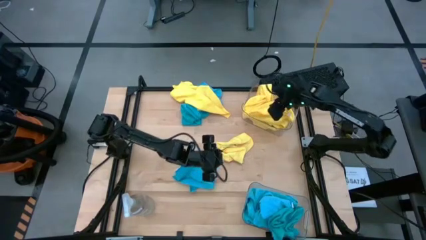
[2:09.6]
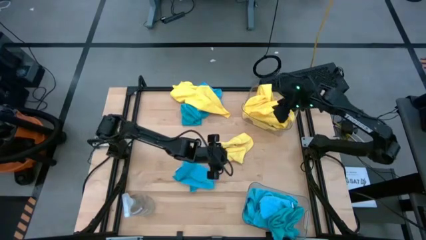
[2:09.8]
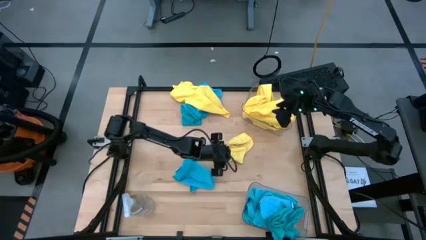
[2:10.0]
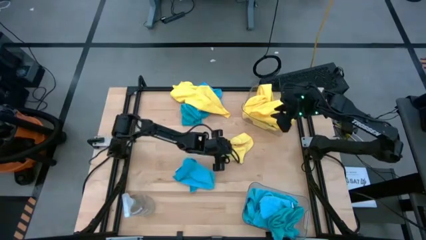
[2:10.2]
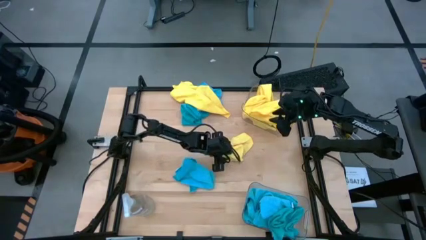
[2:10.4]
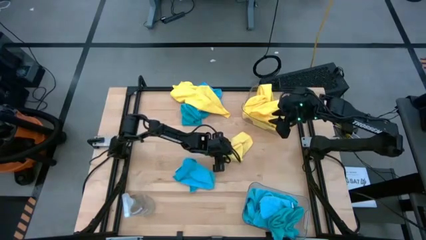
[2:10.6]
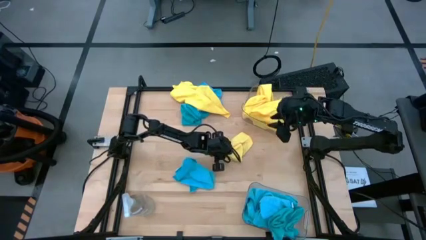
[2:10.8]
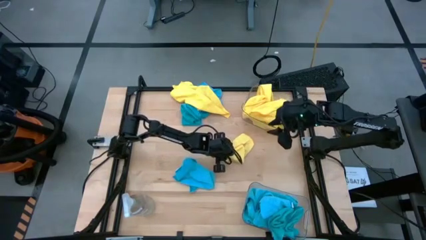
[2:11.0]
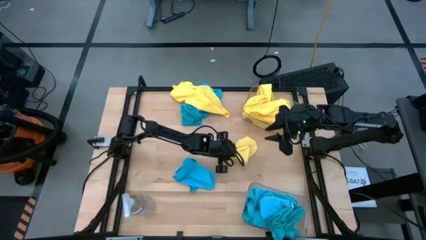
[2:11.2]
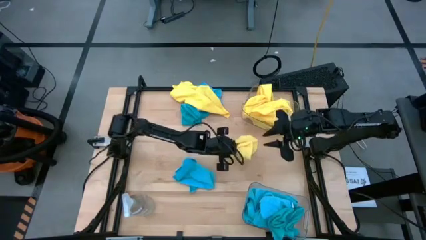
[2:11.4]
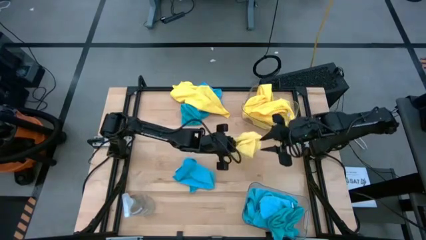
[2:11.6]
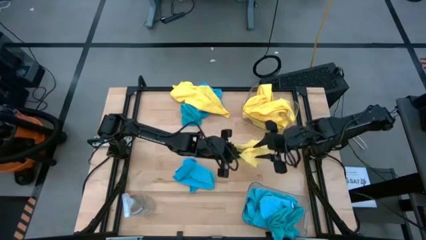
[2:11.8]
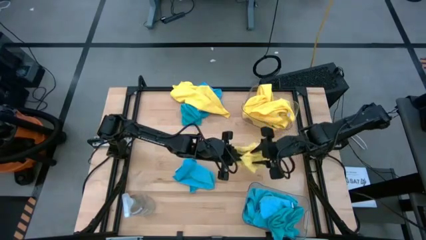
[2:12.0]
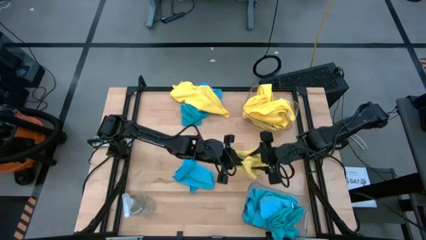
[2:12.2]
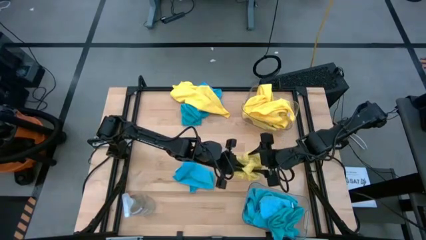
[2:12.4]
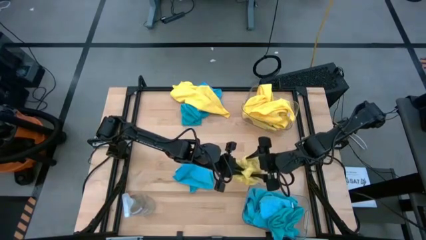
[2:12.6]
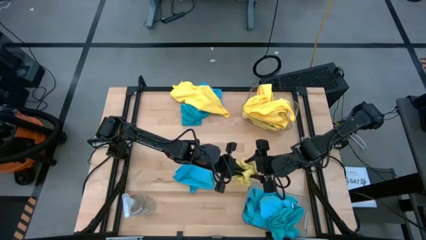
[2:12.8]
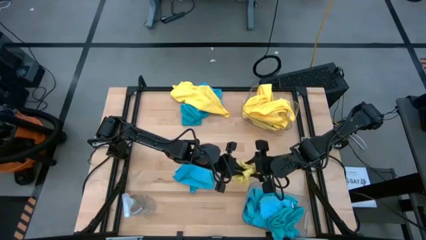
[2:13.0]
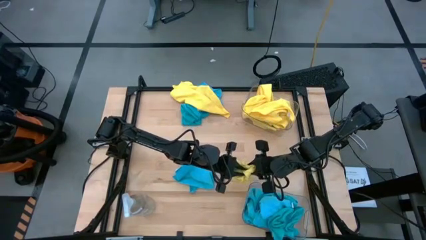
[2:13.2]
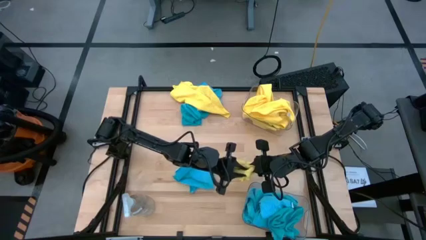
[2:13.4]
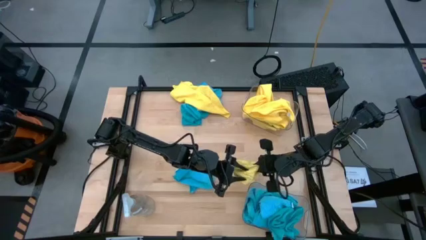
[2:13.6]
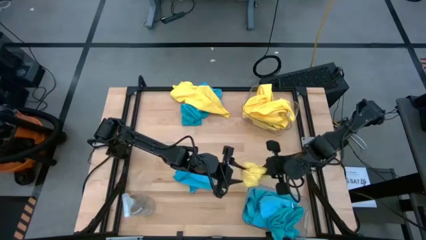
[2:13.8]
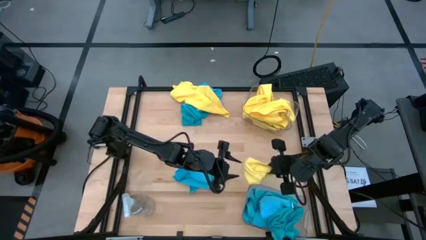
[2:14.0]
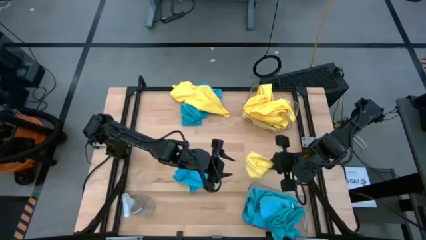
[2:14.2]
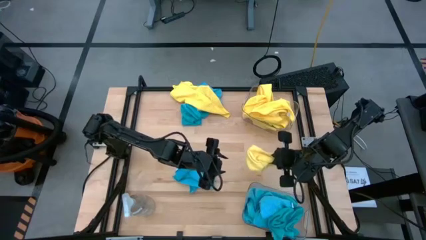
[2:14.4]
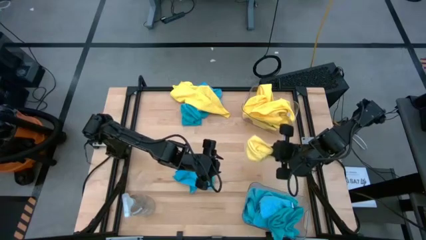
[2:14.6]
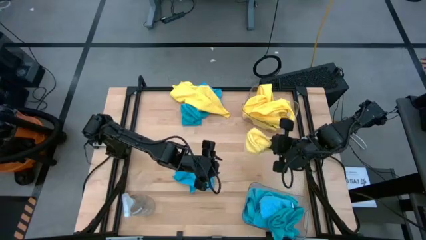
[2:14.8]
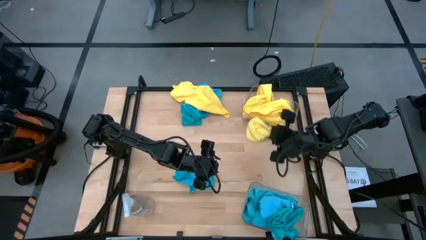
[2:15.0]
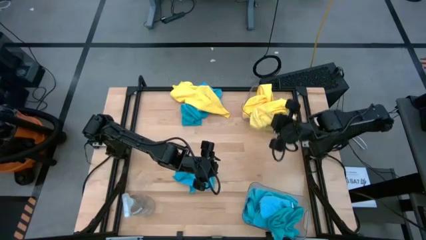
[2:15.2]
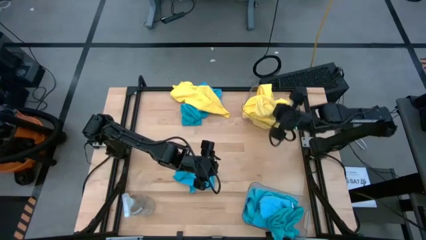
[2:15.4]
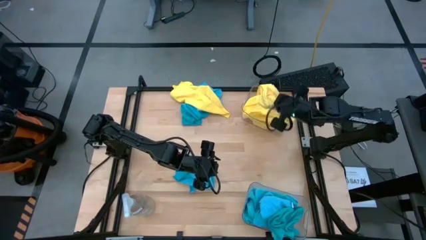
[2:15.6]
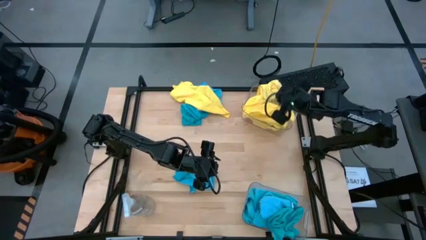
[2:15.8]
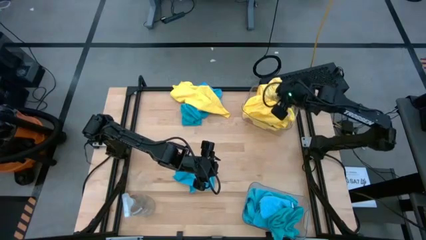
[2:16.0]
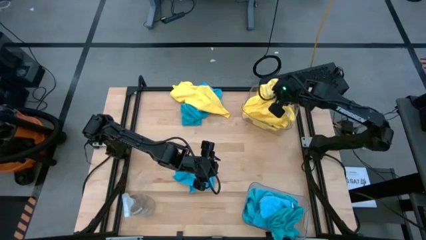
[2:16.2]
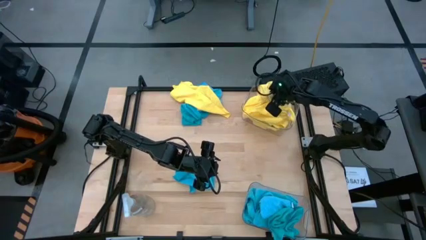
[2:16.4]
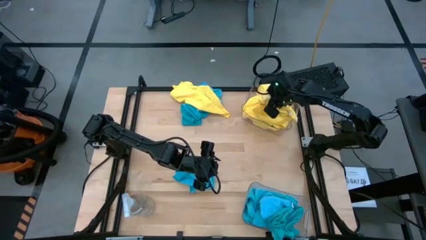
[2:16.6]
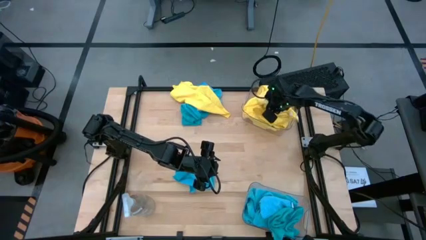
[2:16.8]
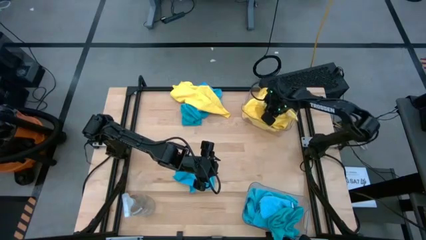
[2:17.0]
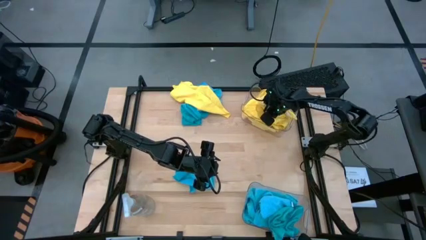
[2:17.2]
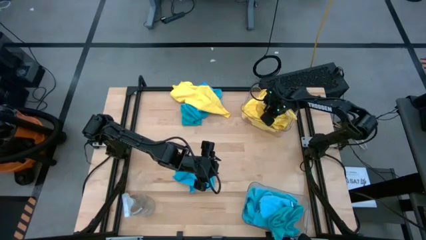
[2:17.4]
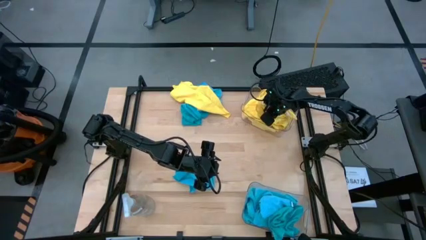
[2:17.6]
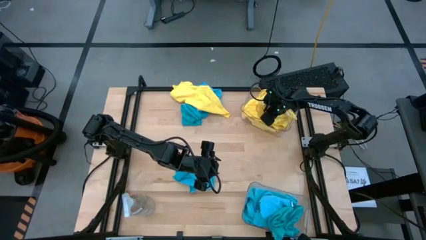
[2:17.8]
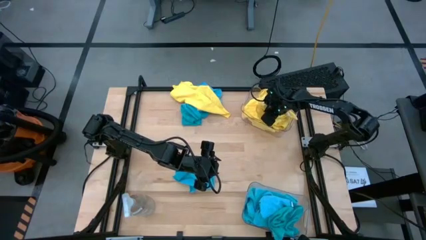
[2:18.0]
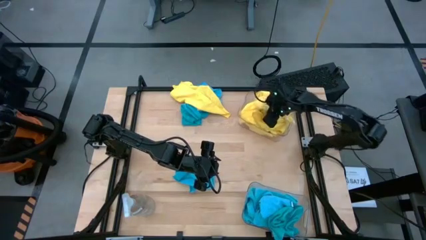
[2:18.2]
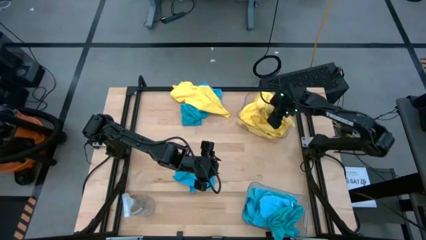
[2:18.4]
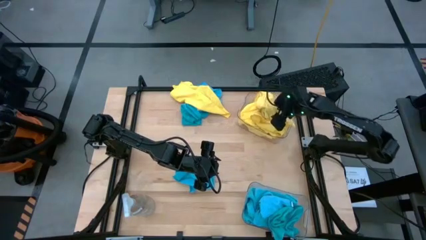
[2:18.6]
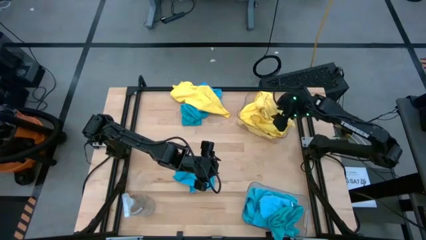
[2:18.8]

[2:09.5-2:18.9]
Task: Sort microfiber towel by color & place in baskets
Put the yellow microfiber cloth into the top transparent bin

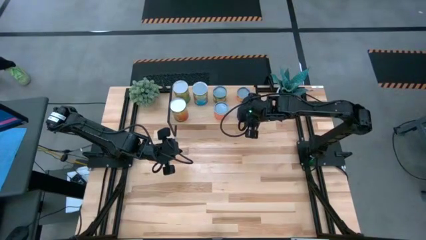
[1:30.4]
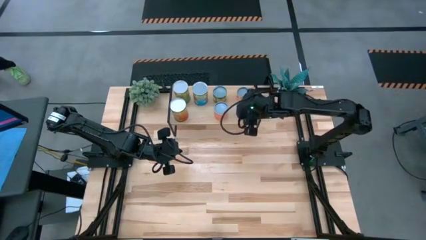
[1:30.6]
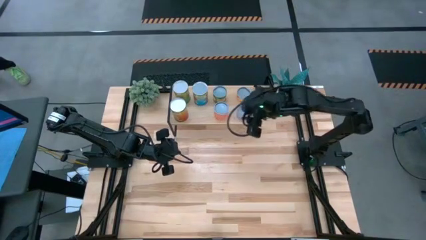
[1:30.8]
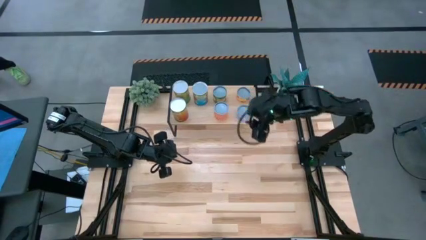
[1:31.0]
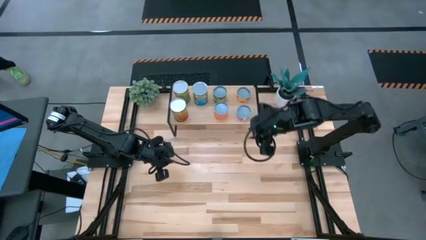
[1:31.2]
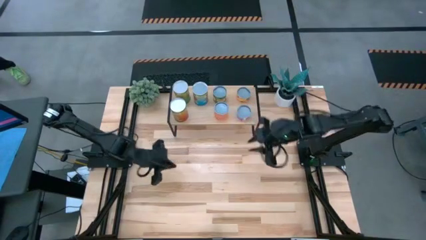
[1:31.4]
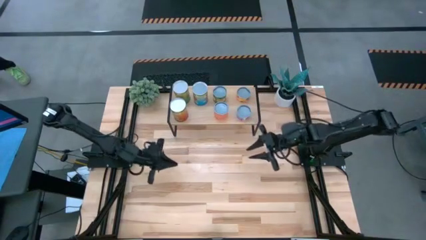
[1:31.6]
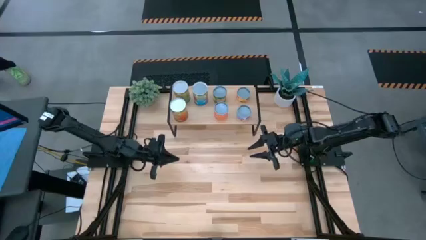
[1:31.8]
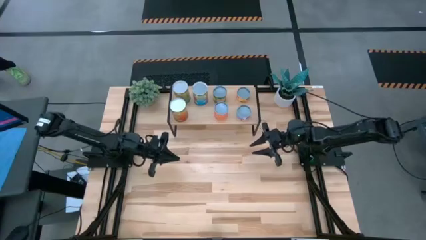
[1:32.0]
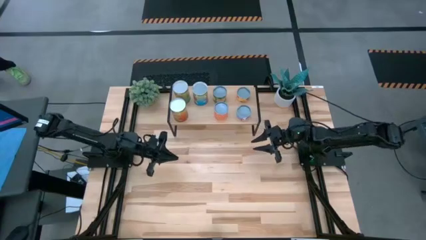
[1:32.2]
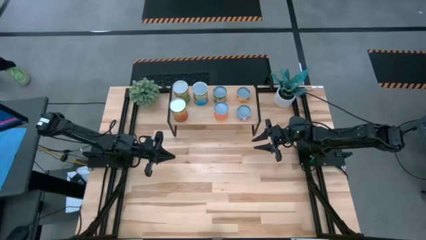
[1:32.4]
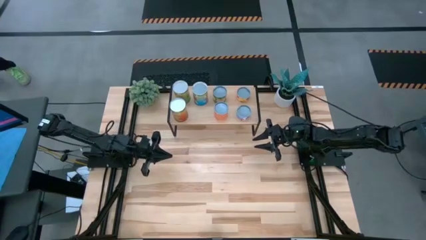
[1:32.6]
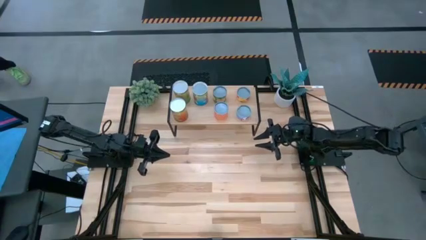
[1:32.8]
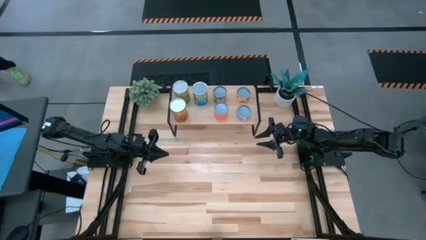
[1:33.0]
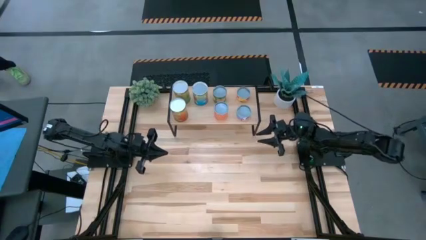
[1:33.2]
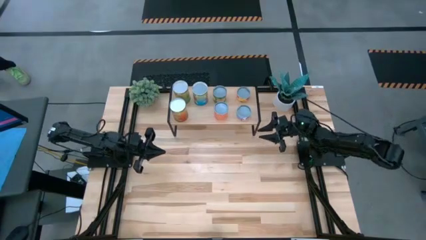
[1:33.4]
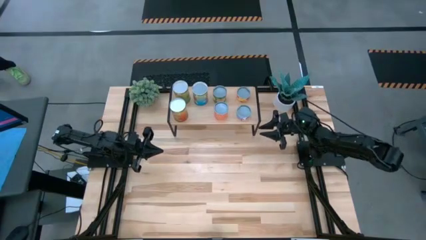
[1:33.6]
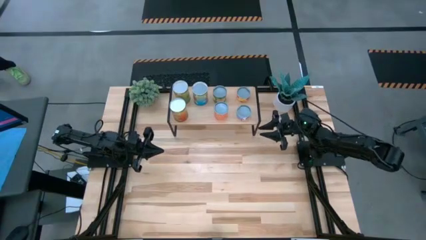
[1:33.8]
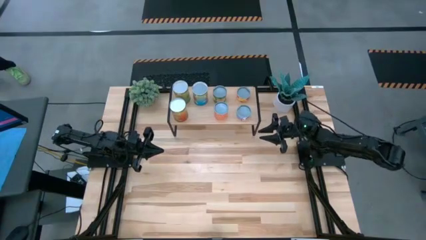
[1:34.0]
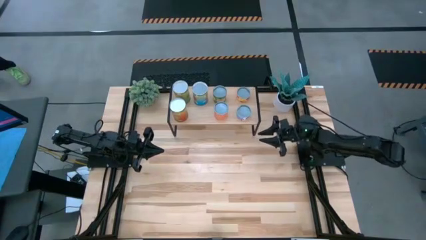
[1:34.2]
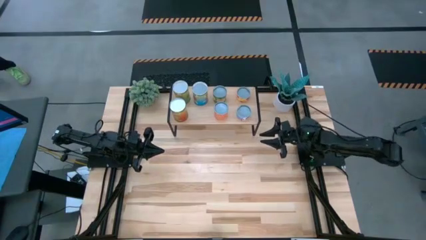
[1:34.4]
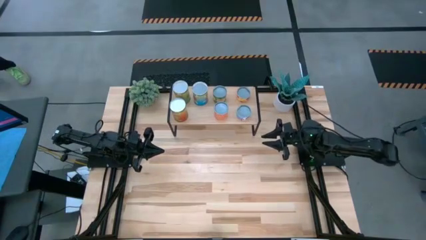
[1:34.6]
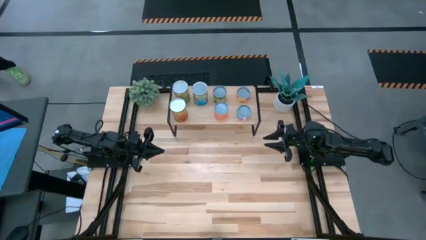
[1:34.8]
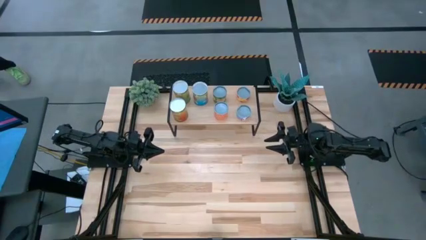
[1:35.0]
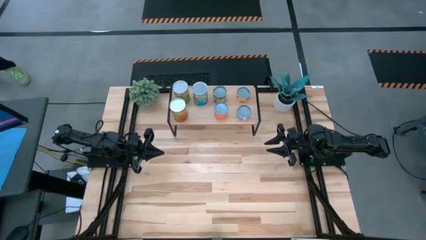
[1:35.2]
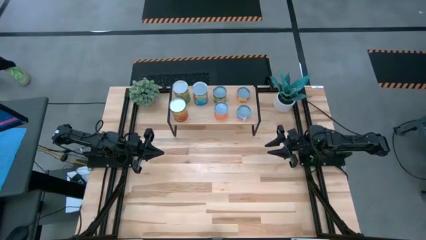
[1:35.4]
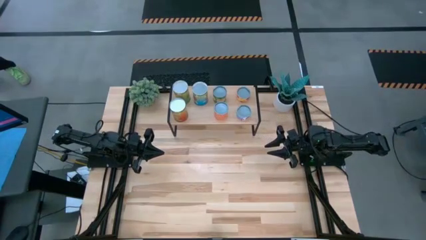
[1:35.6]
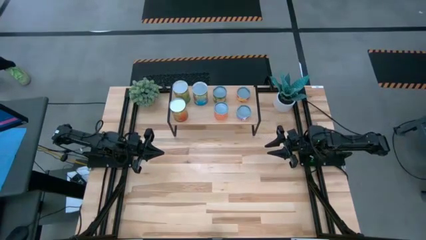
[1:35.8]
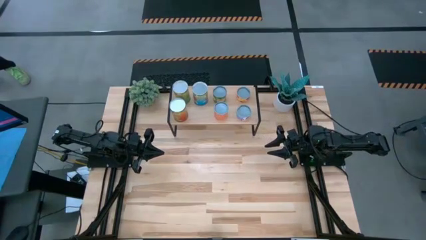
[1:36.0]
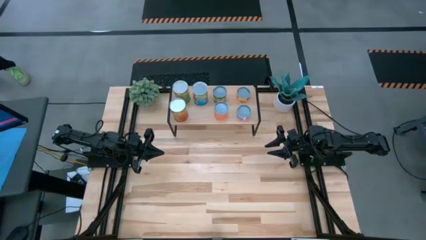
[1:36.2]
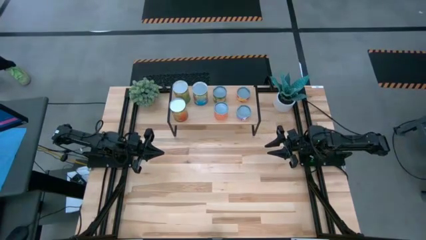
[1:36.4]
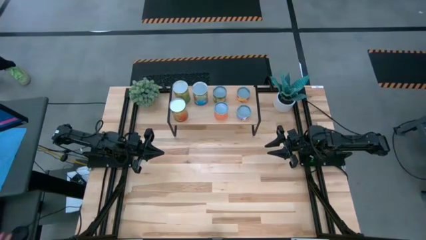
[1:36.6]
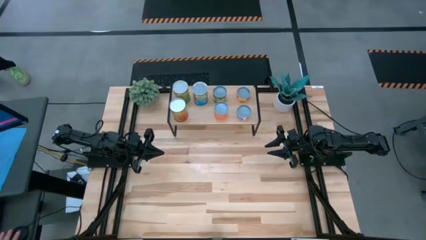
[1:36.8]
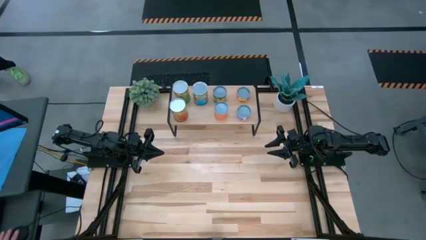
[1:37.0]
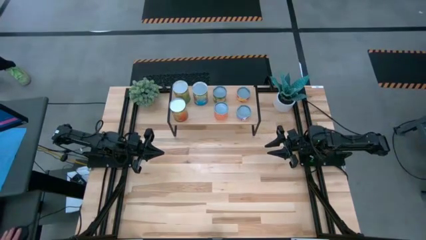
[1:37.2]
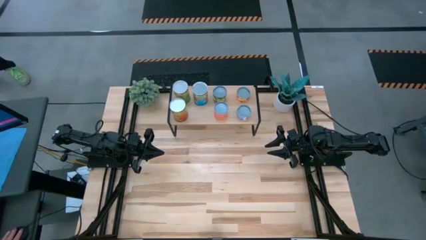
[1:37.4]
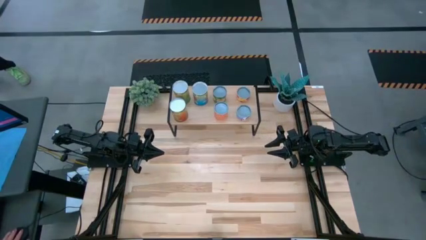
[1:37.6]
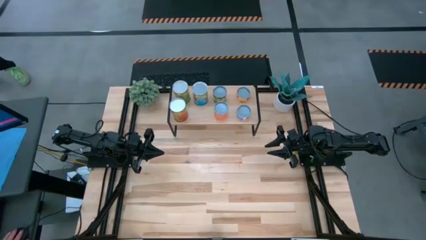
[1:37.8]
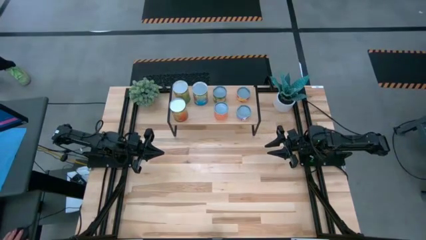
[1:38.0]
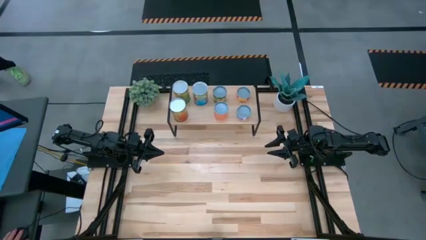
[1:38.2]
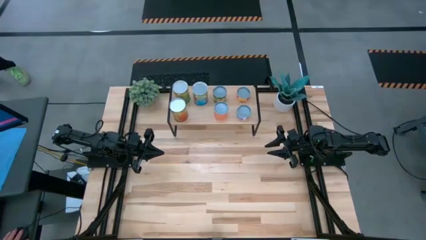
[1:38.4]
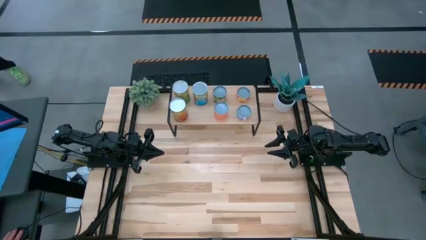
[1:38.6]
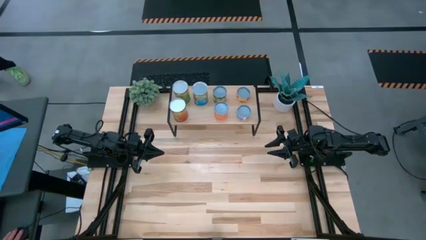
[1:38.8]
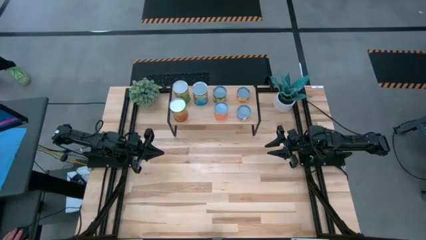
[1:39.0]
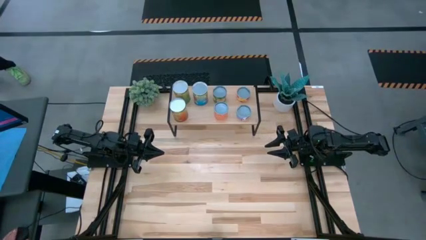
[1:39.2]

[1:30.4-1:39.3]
Task: Pick and place cans onto a shelf
Return to Home Position
